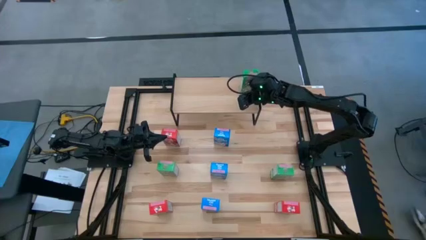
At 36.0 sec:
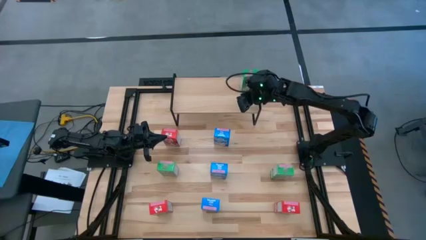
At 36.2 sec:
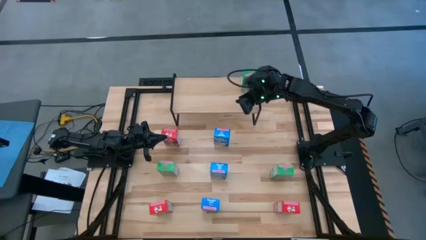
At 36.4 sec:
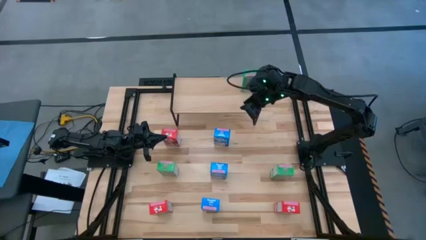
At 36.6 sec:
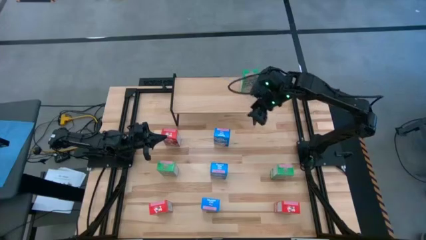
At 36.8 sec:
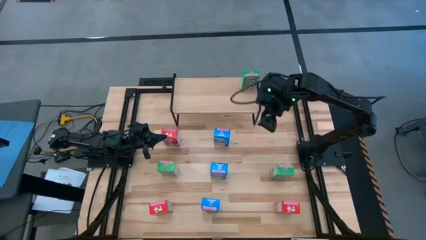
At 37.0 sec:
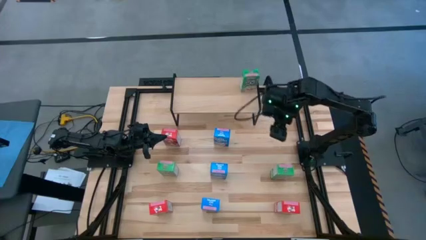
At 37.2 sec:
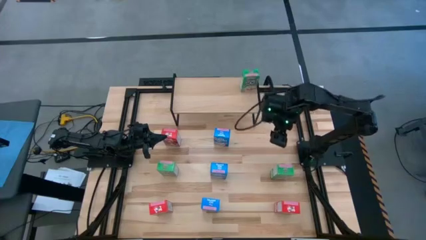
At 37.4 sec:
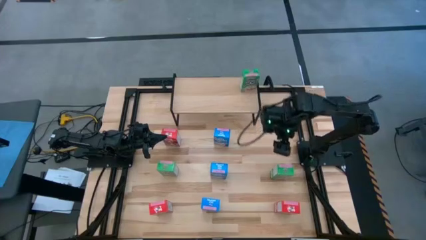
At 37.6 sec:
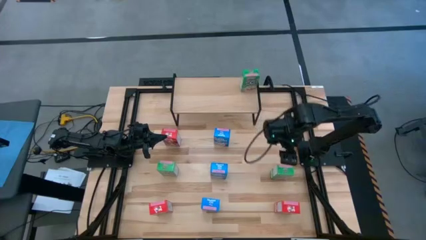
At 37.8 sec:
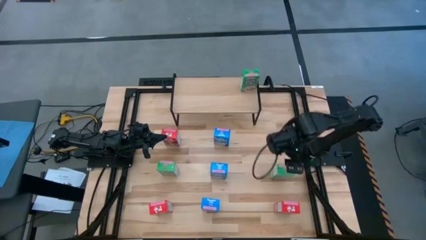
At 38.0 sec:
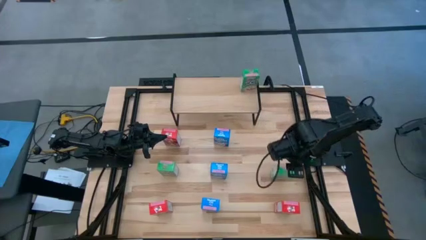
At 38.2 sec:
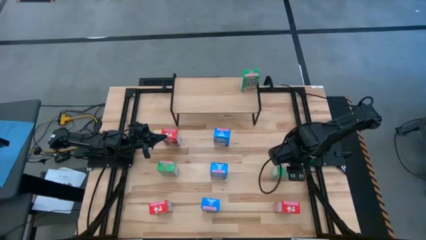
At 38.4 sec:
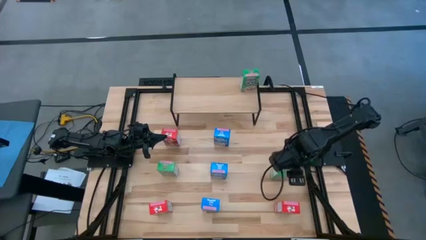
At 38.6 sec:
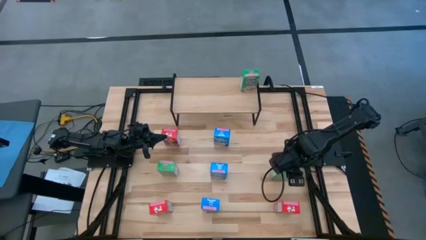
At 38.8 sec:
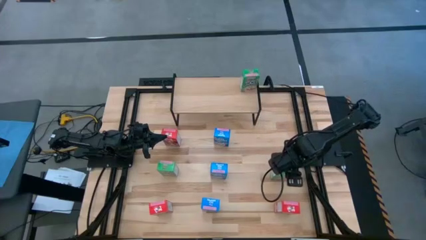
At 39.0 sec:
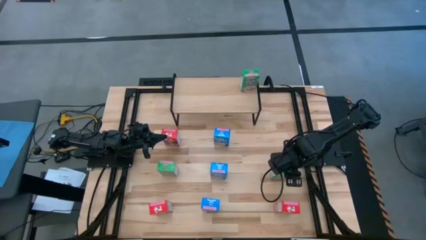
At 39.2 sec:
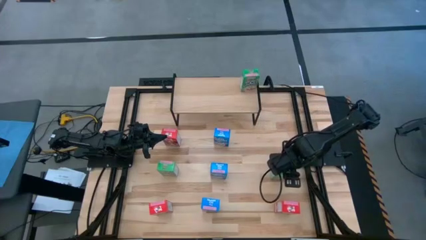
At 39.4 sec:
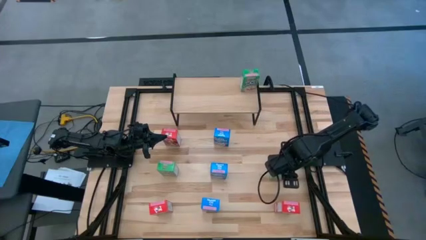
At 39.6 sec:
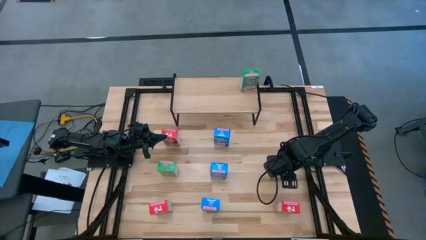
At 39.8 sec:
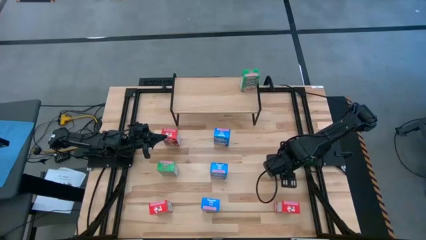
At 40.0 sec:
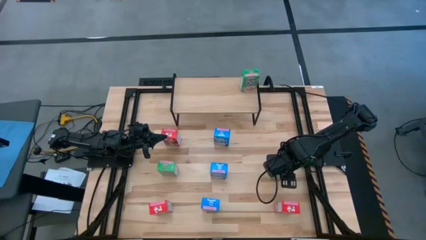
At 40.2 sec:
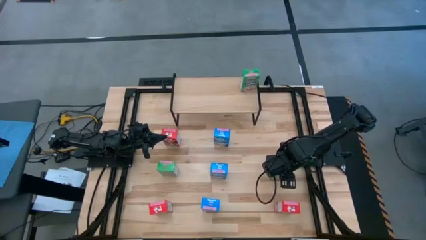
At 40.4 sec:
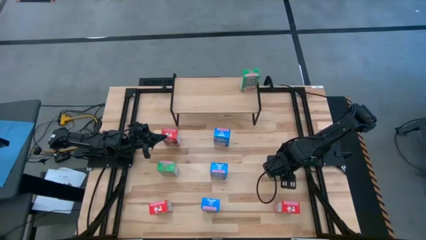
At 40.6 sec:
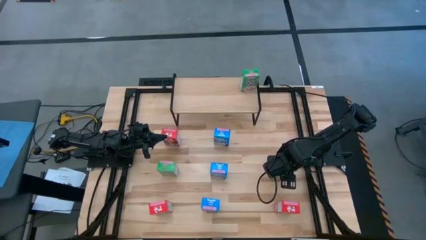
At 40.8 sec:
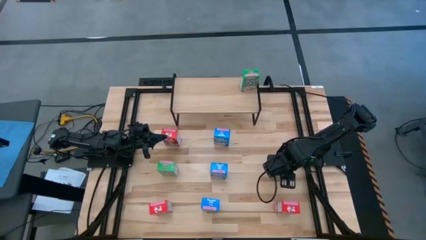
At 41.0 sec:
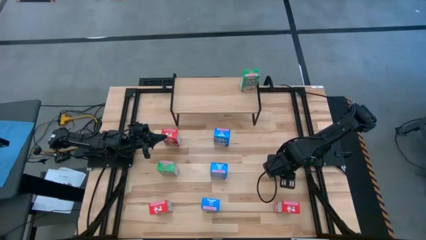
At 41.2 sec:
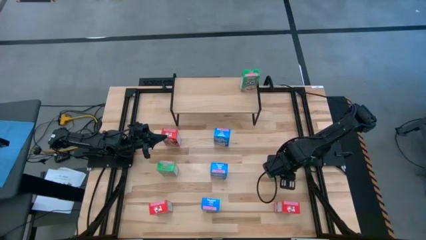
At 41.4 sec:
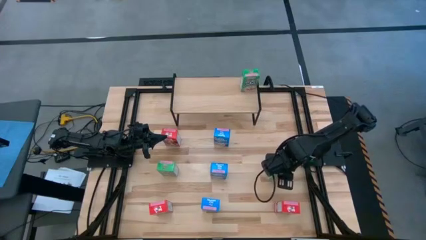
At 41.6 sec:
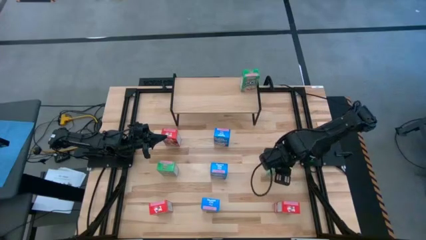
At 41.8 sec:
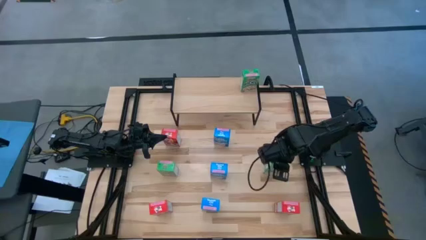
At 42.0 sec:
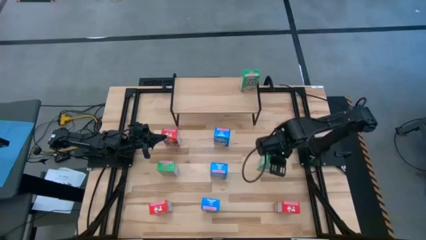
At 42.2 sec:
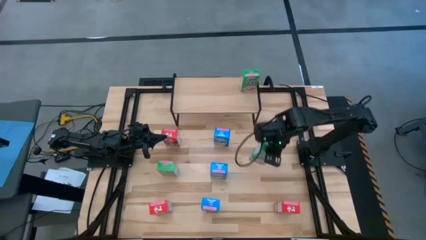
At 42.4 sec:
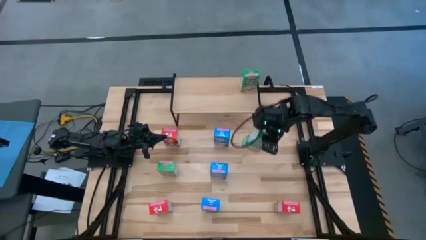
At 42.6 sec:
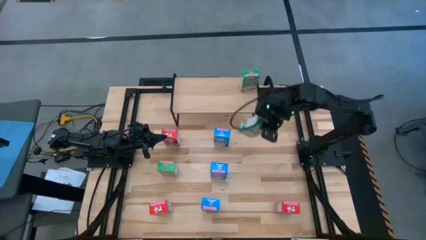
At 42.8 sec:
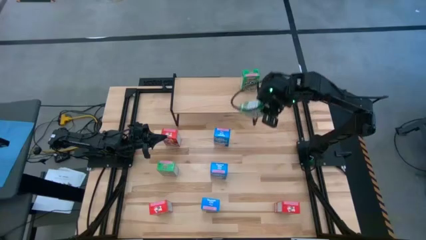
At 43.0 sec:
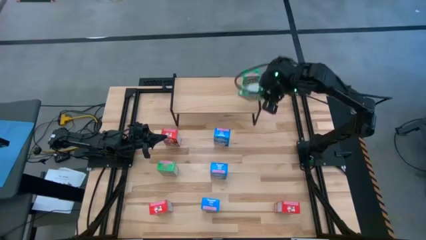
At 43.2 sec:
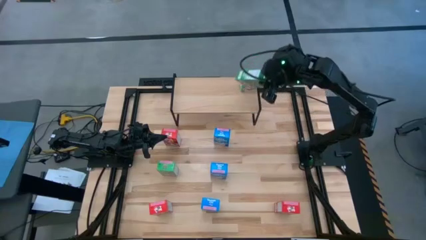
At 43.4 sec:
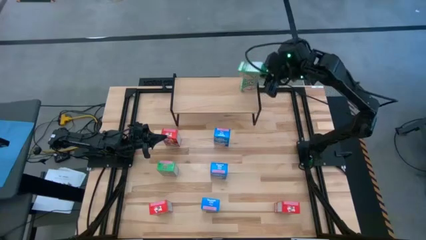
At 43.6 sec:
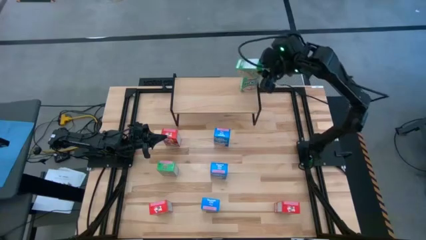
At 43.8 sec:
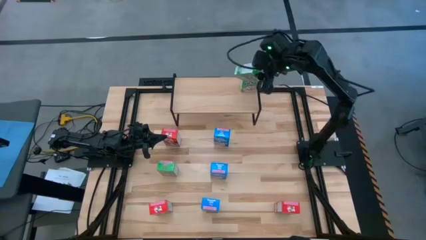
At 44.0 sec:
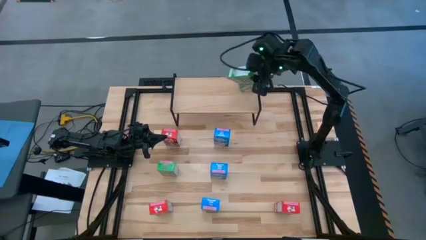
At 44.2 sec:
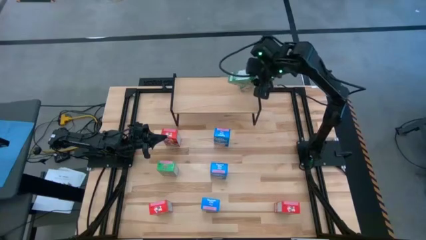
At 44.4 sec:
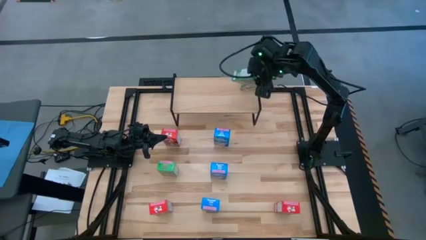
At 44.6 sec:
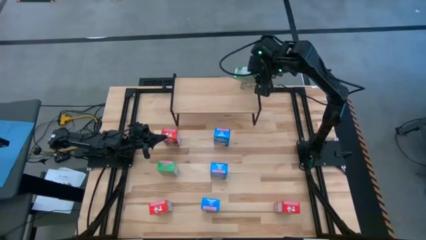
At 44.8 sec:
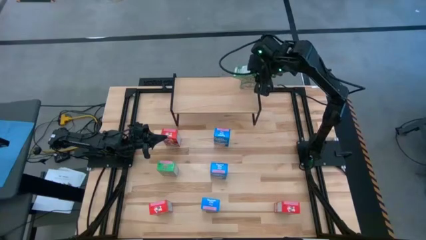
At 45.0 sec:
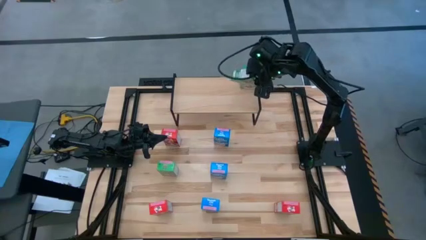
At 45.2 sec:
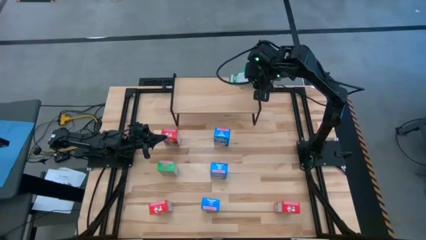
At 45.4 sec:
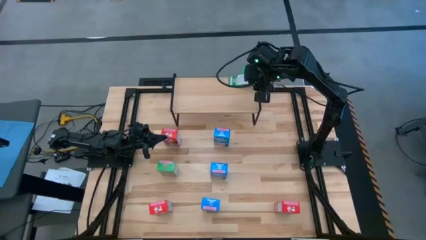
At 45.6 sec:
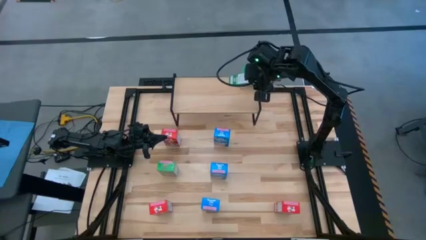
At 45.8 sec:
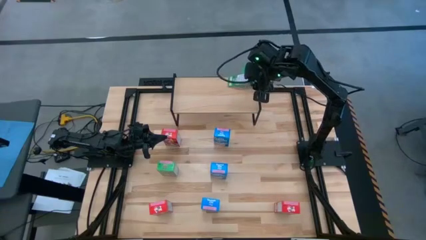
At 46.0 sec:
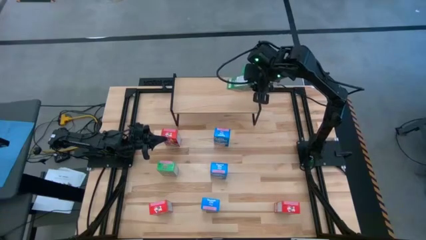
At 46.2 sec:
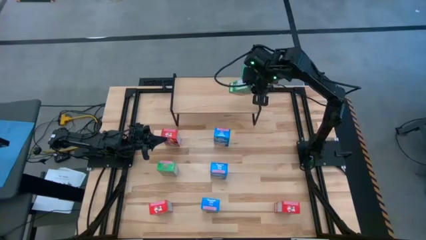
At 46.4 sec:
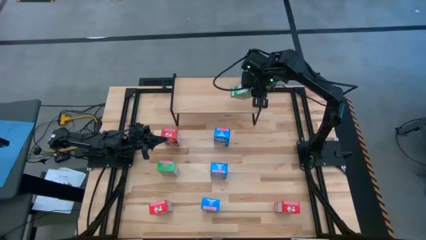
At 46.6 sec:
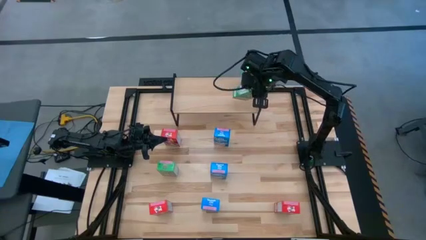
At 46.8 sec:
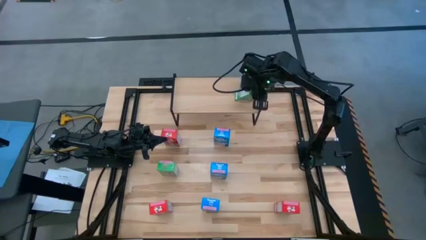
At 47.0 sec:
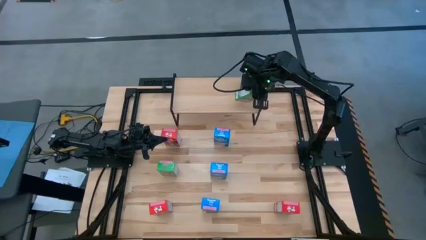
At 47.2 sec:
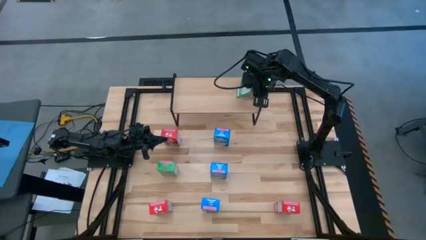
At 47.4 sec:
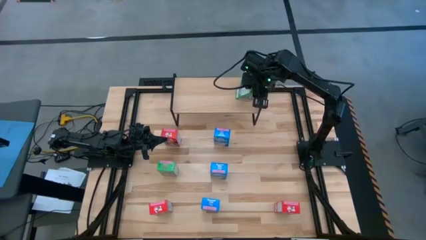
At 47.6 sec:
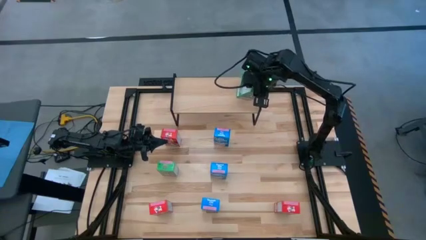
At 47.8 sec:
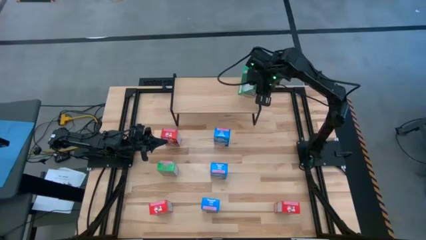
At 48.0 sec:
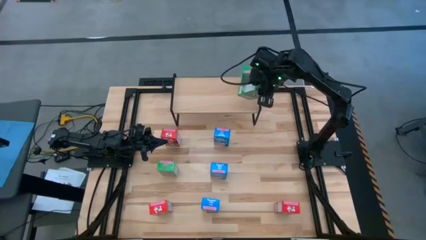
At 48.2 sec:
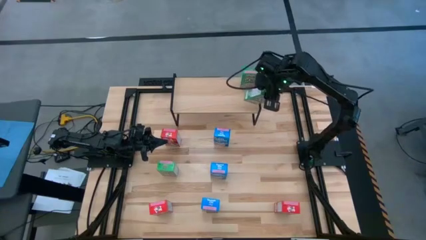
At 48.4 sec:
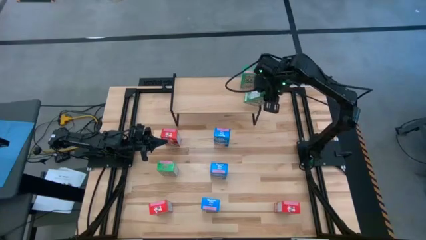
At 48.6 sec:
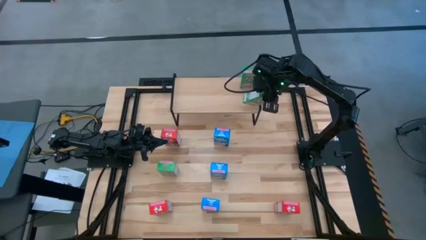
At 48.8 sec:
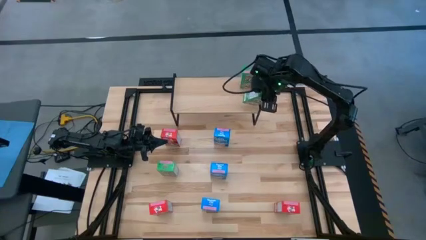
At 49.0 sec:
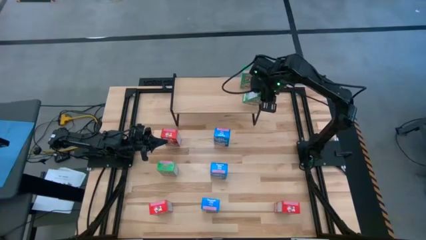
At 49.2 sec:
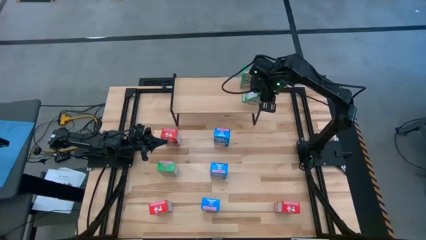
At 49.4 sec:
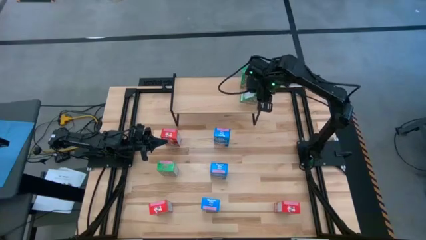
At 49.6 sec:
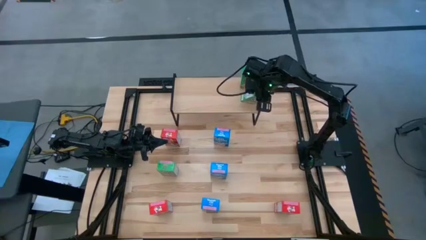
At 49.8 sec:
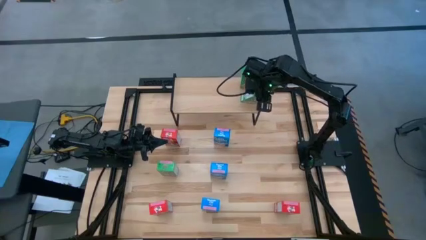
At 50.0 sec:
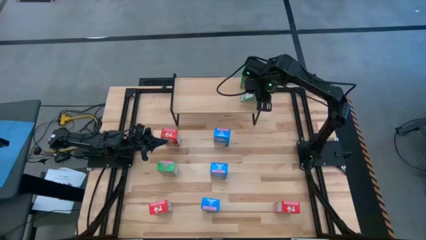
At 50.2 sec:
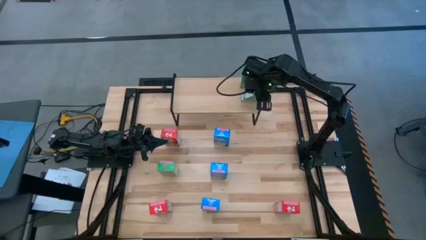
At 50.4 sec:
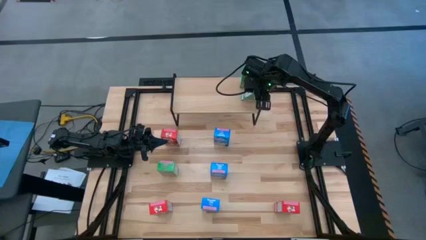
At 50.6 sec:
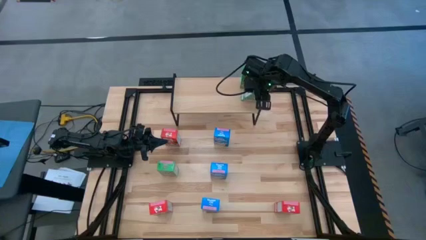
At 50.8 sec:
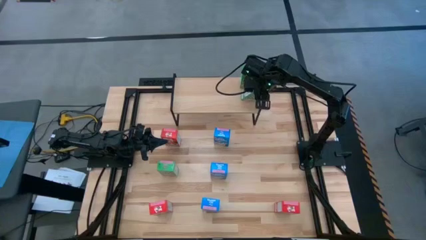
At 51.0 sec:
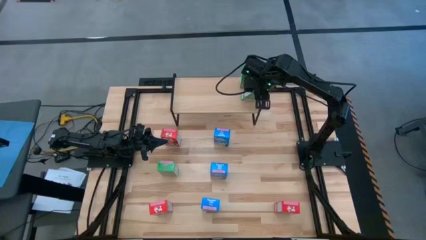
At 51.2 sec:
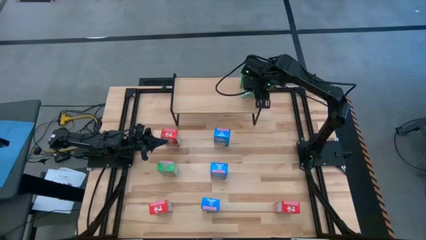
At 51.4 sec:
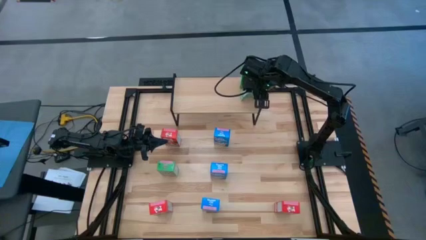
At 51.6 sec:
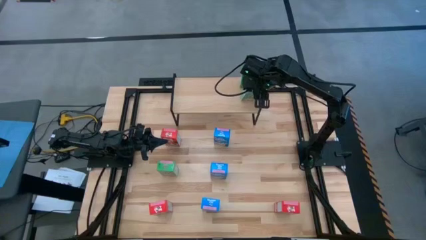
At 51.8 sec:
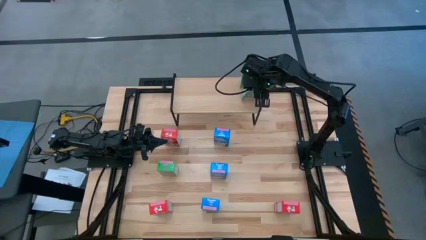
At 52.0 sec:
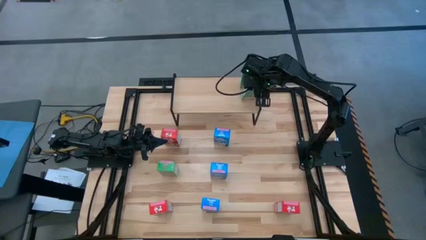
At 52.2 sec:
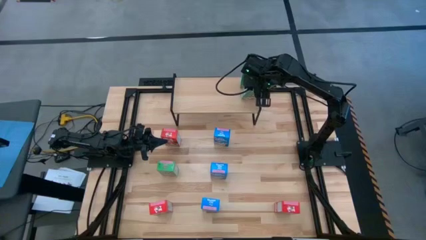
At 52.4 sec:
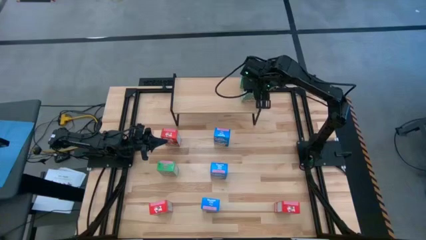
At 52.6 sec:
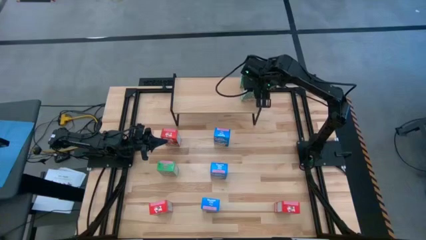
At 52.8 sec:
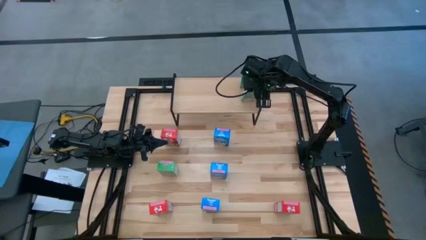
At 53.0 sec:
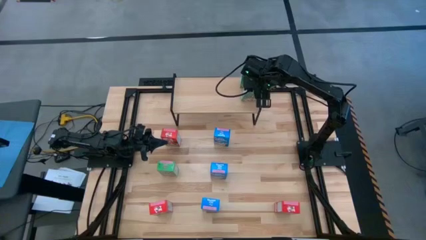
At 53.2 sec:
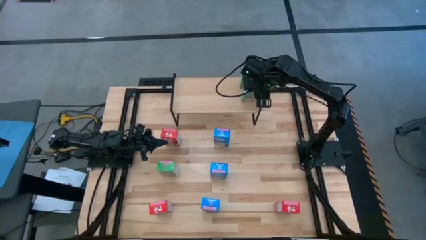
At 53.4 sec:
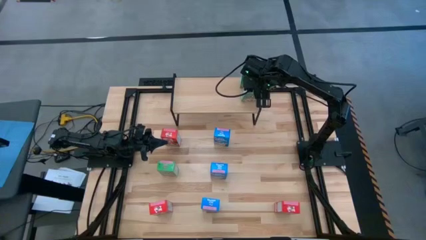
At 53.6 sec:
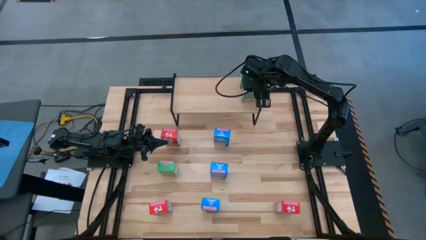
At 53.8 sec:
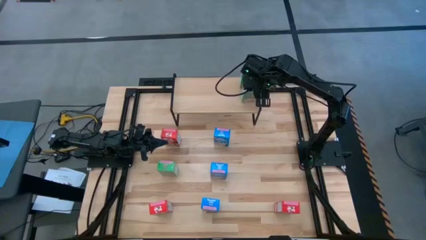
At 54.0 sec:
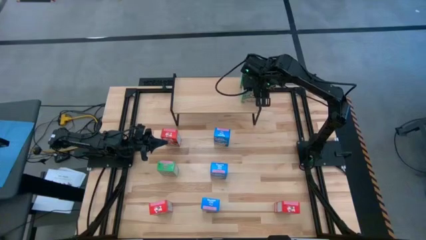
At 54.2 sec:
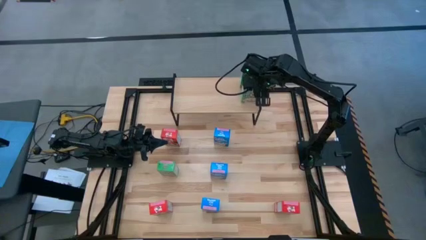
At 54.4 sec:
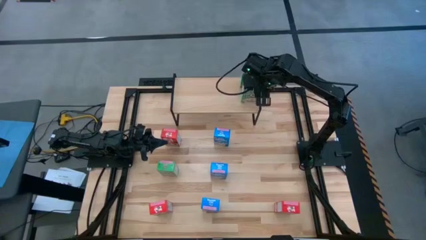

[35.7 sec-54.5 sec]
Task: Stack cereal on shelf
Put the right green cereal box on the shelf aligned with the other green cereal box
